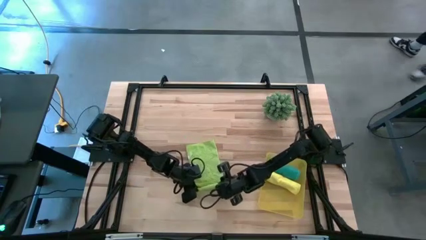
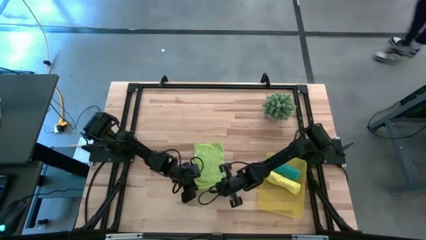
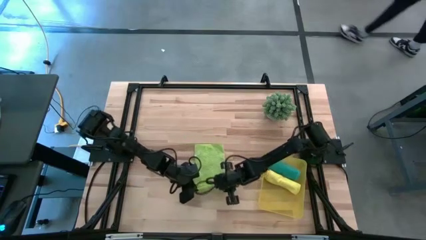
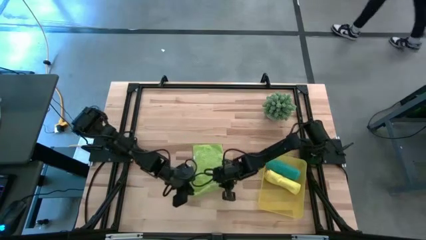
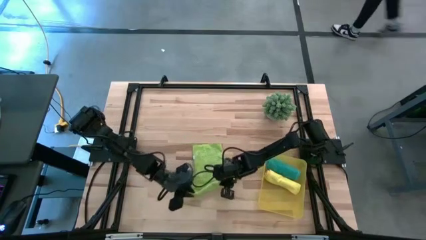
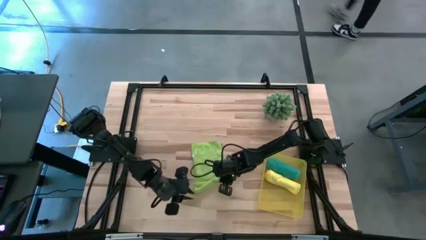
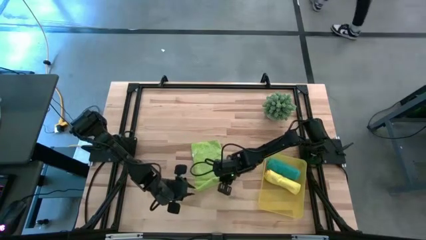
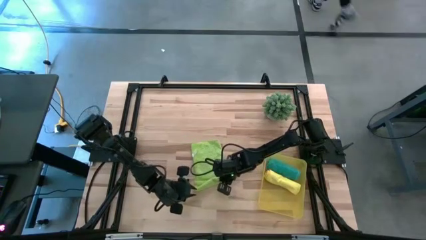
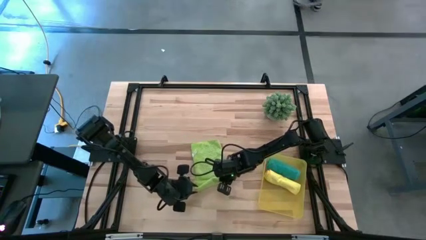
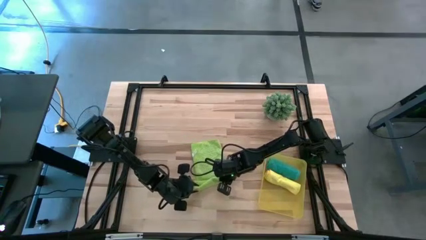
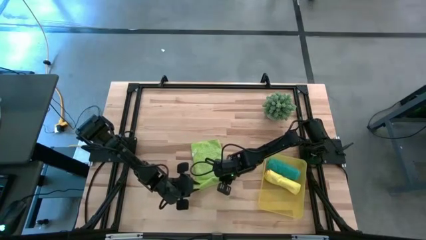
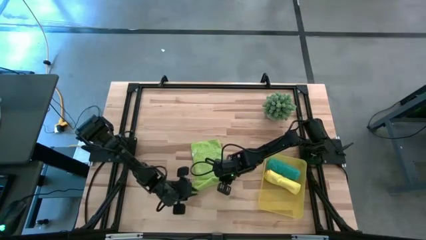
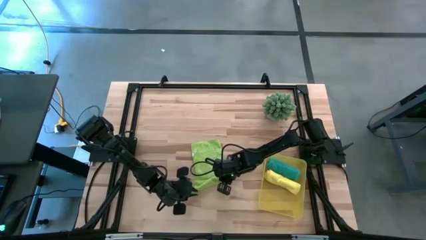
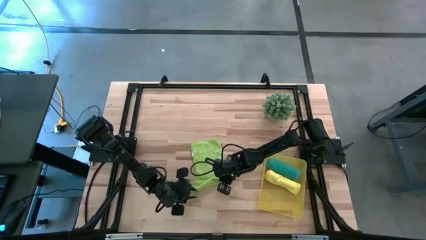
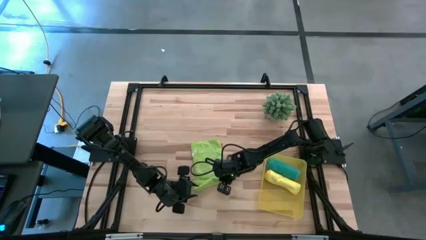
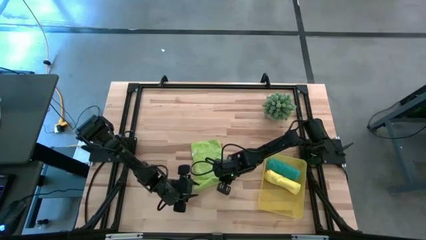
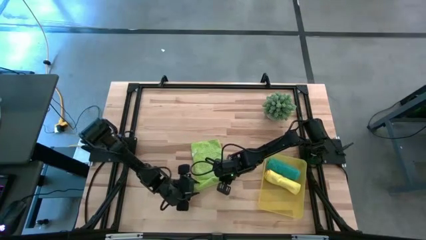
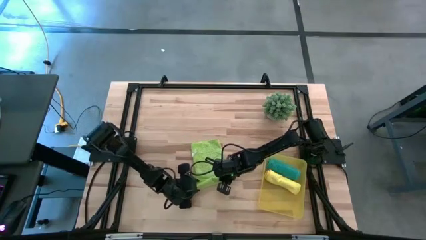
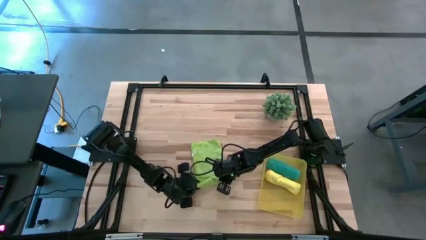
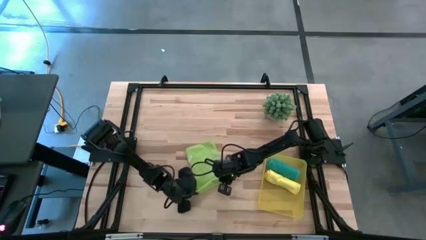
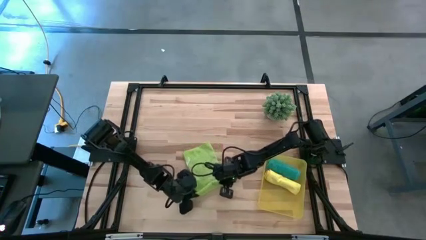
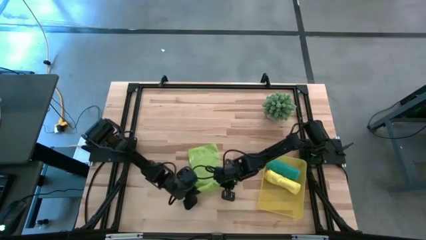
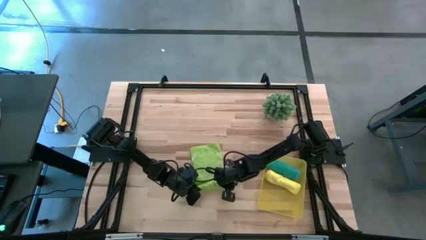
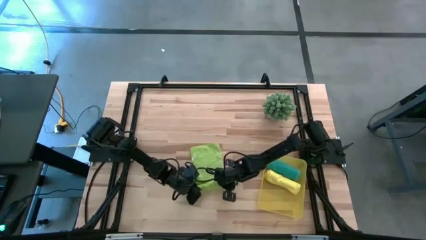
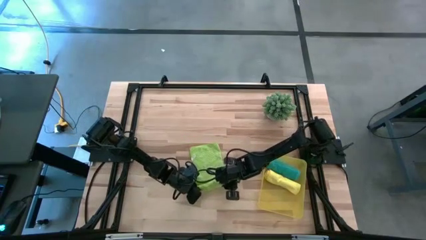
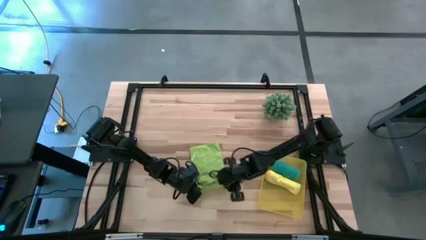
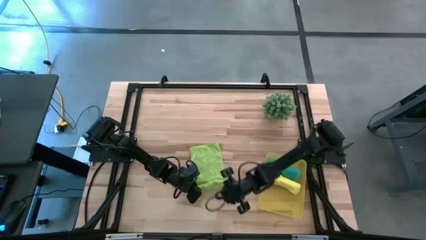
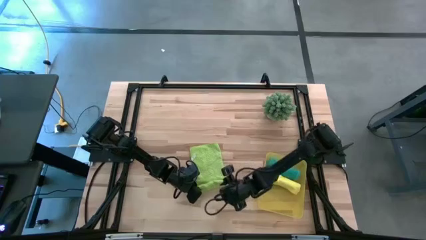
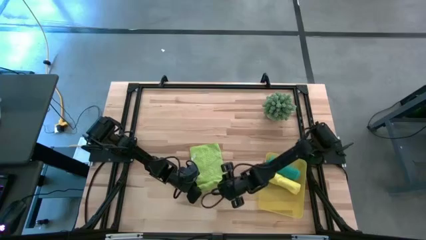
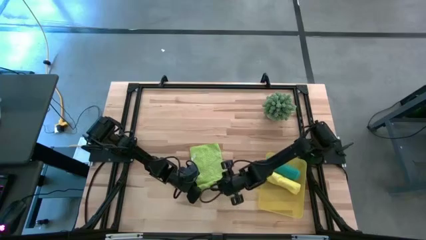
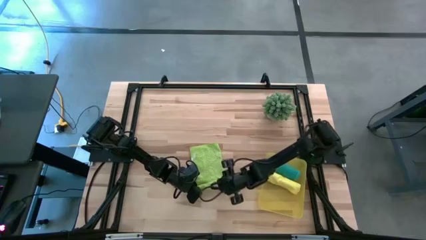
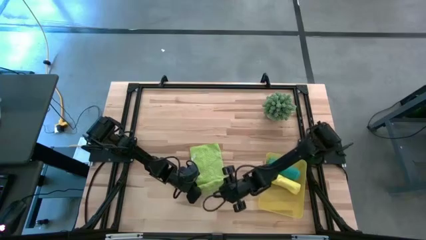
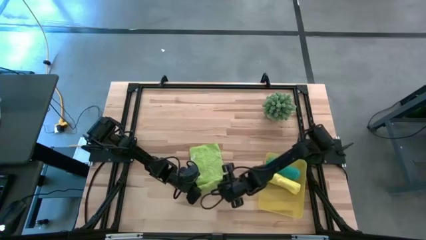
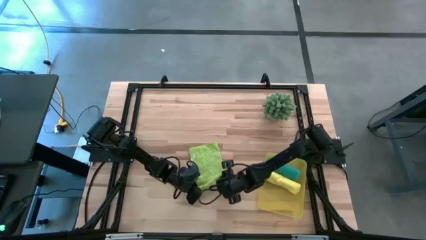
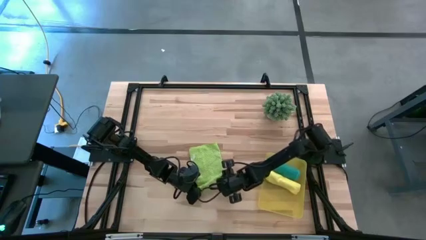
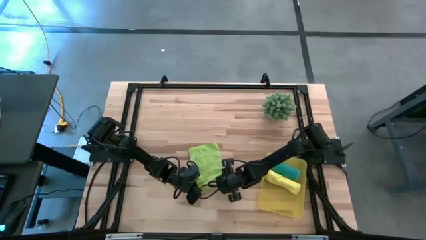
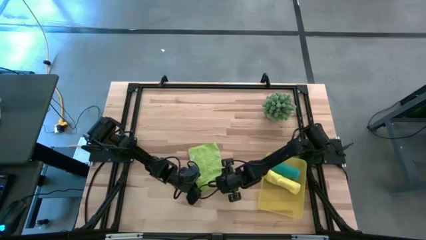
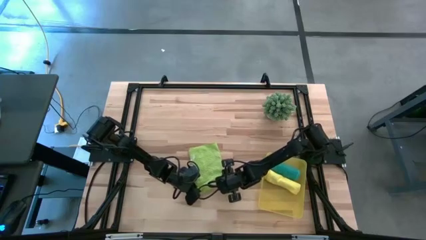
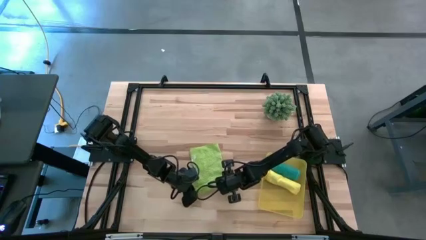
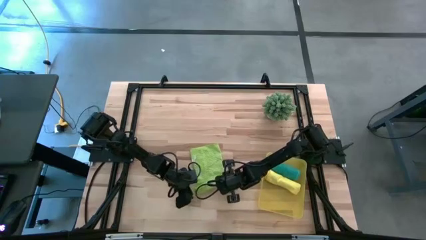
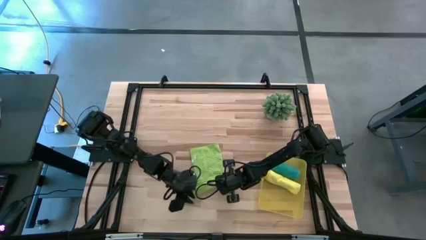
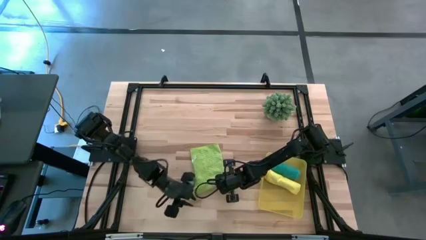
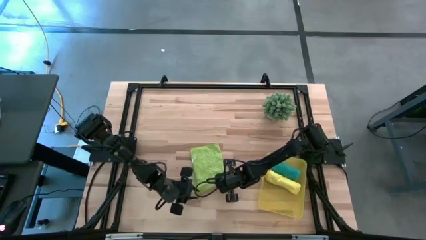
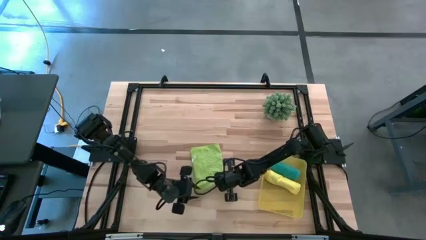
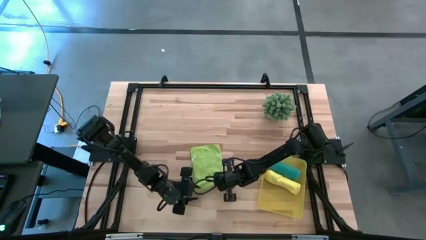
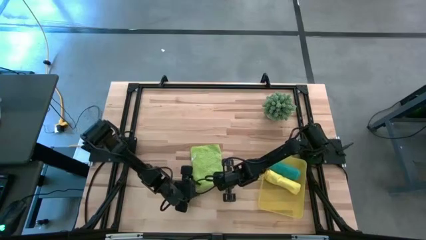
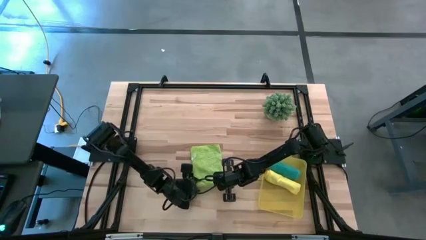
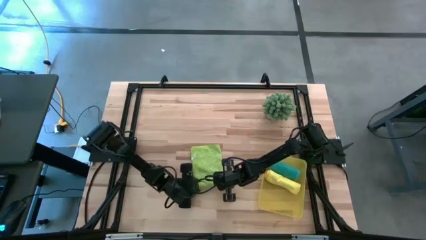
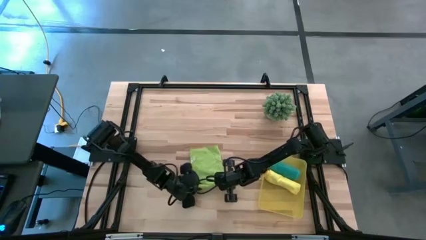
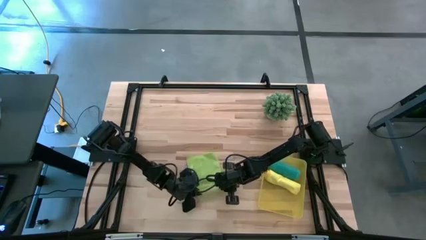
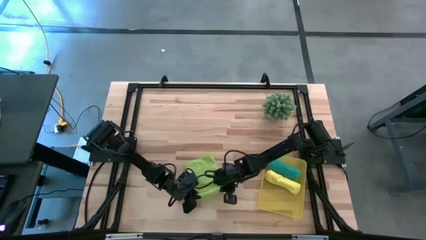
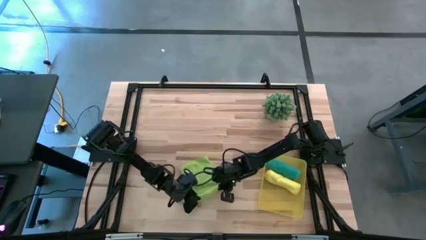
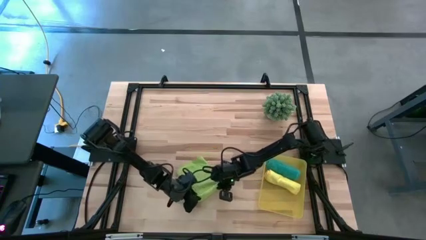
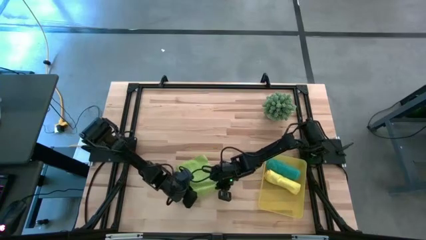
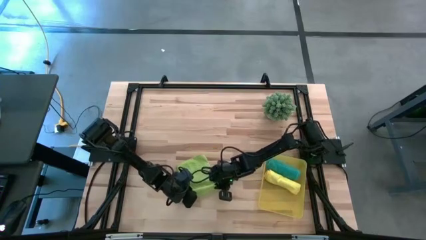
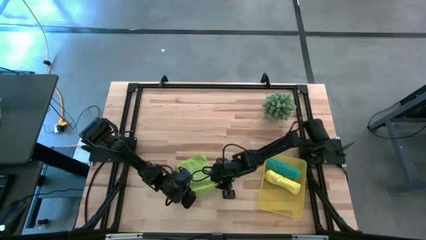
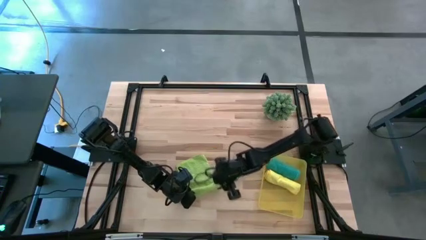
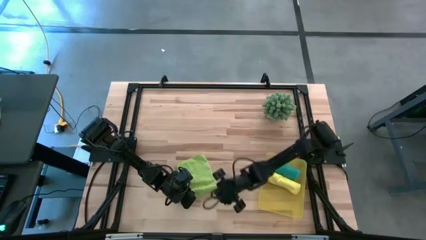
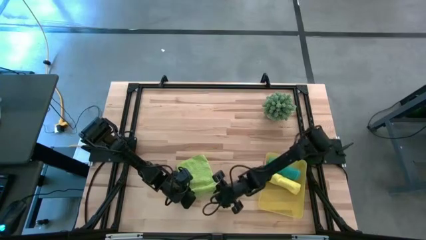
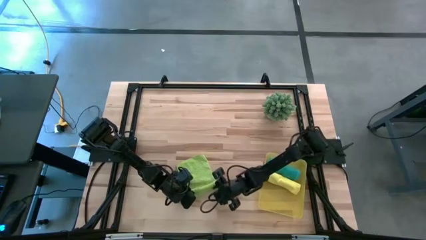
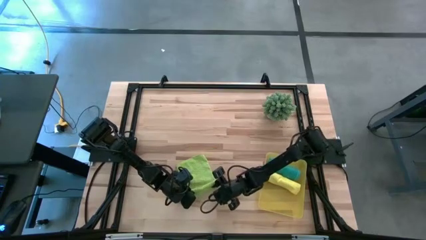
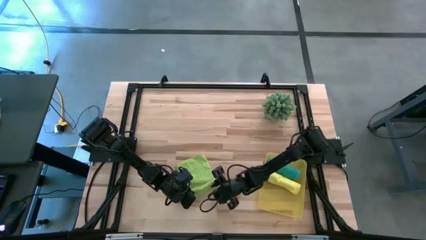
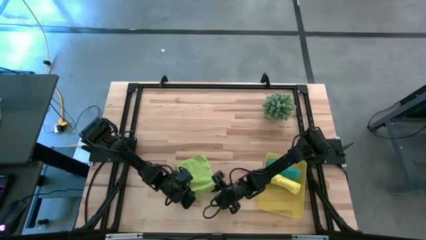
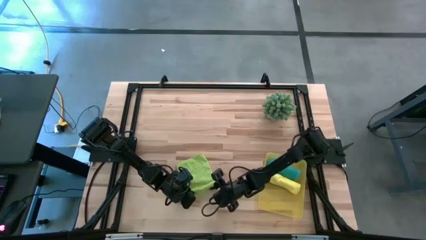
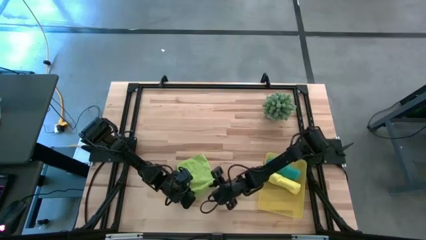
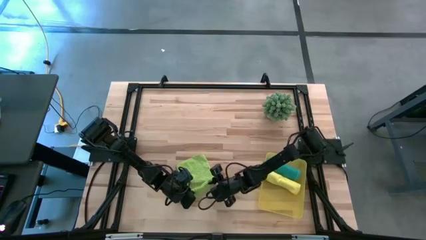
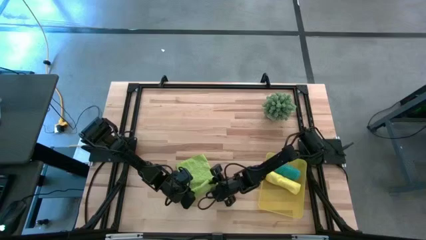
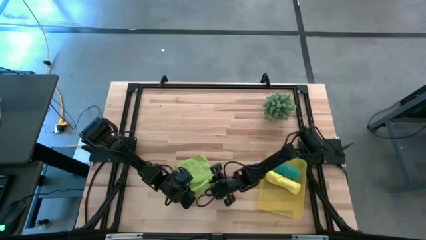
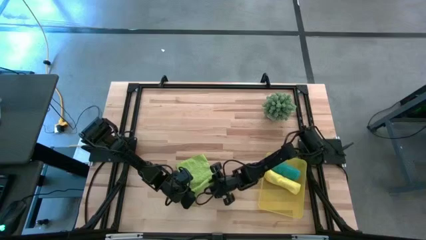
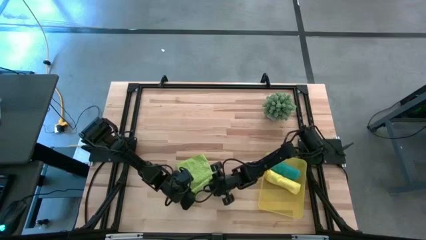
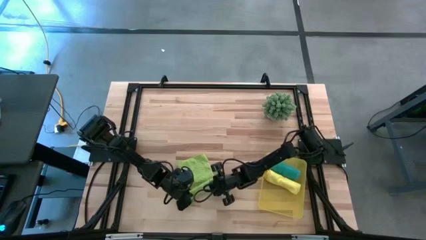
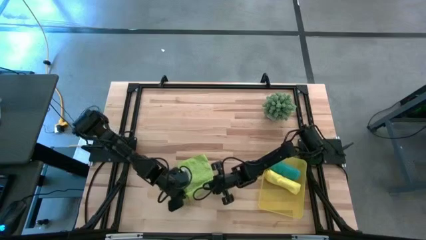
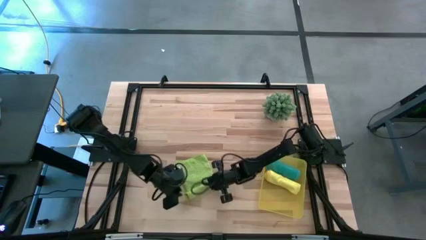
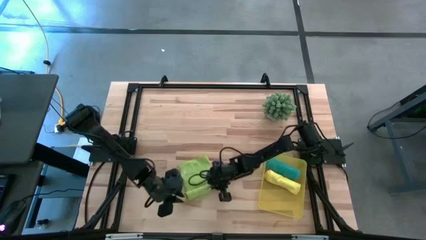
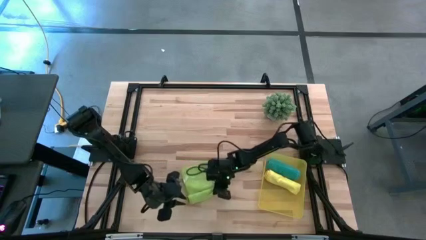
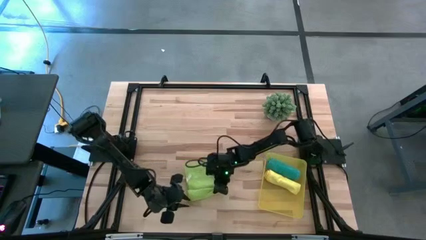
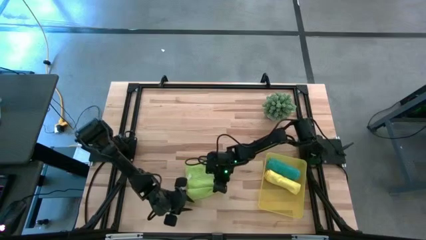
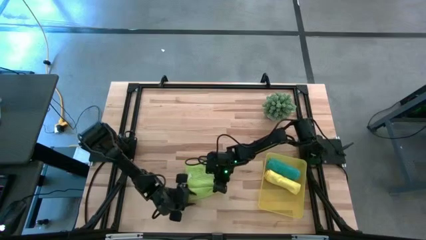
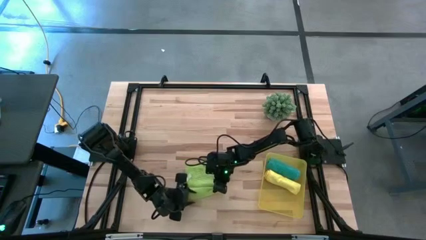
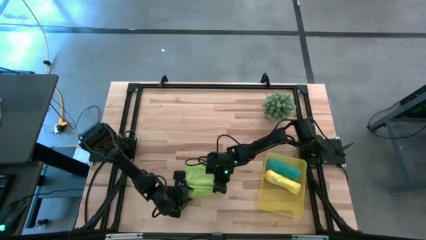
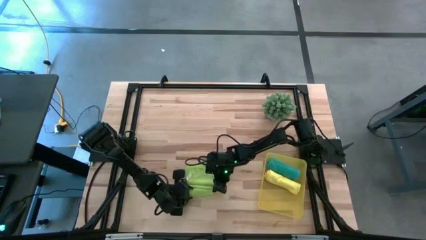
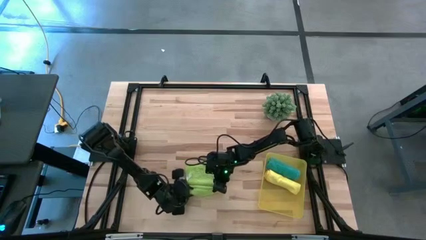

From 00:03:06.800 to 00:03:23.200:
Task: Roll microfiber towels into tight, uniform cylinder then place into a basket
Roll the green microfiber cloth
